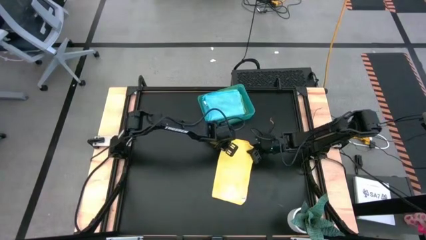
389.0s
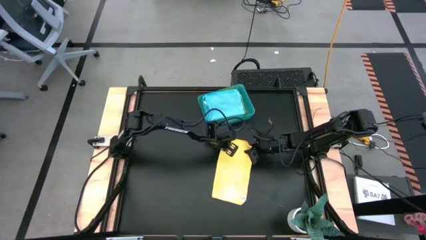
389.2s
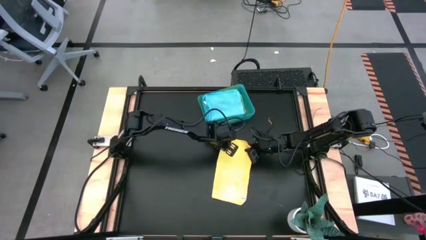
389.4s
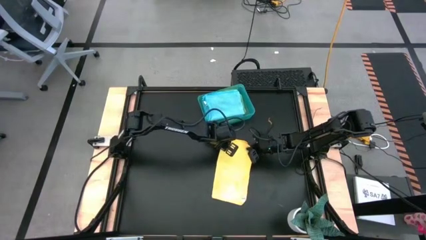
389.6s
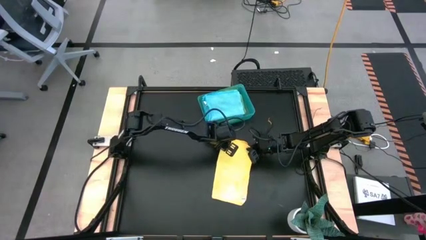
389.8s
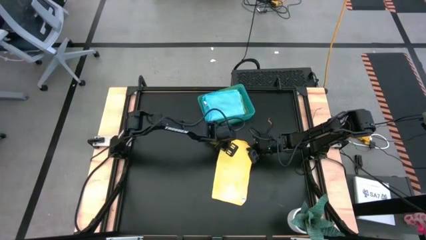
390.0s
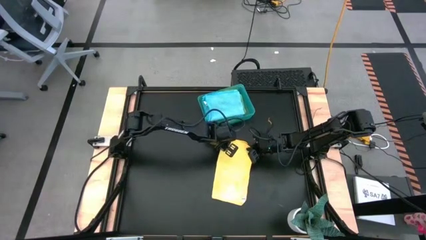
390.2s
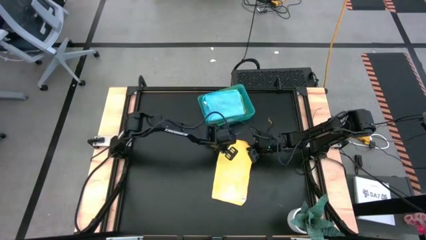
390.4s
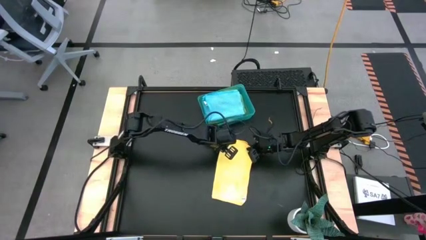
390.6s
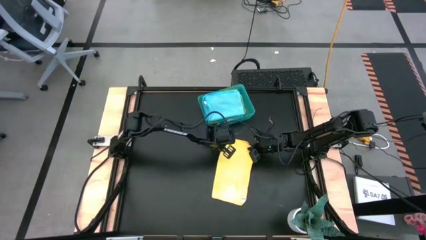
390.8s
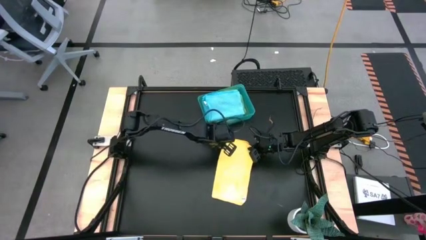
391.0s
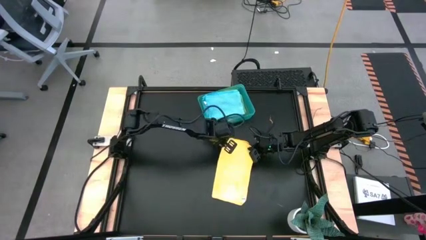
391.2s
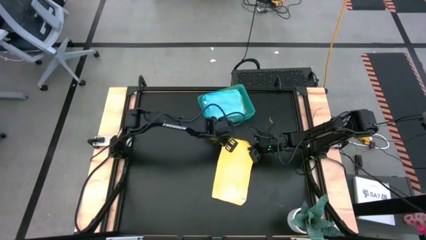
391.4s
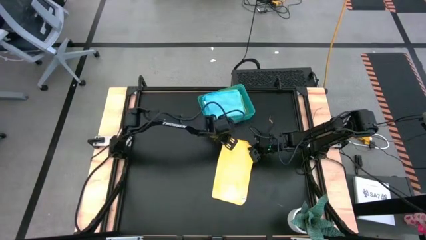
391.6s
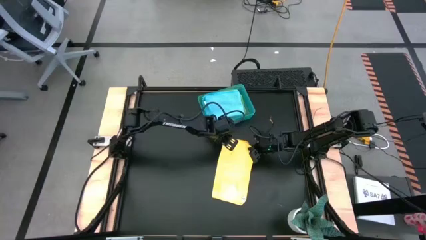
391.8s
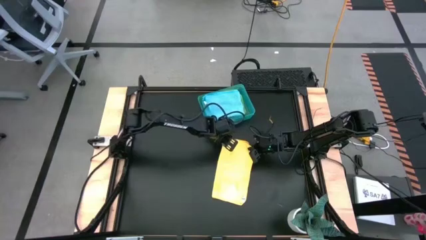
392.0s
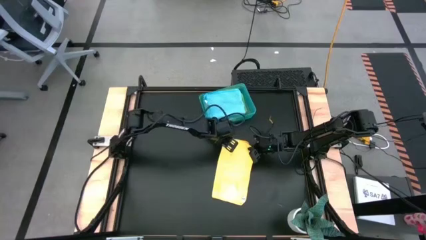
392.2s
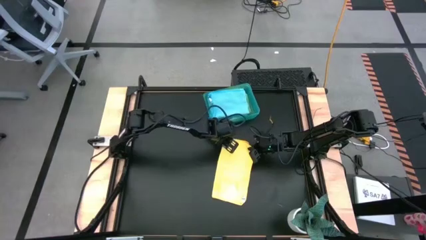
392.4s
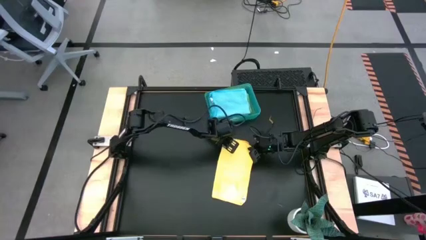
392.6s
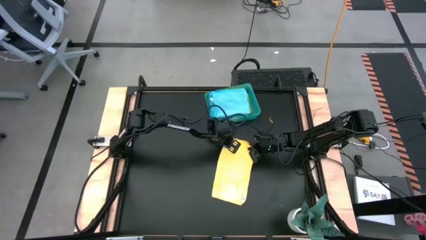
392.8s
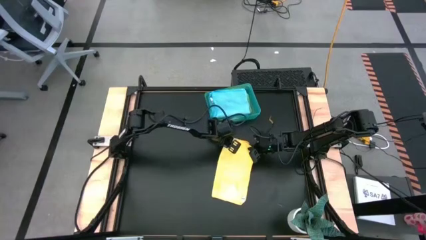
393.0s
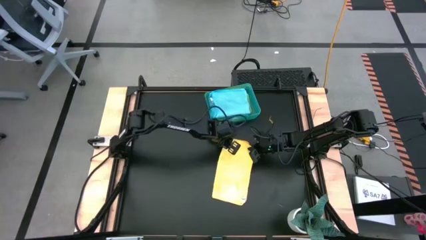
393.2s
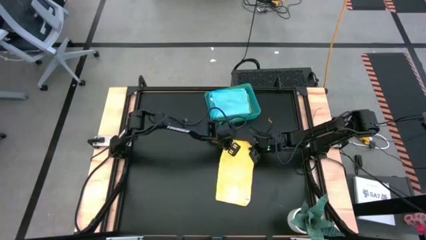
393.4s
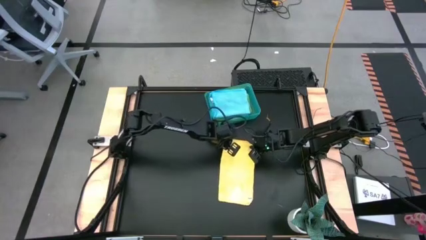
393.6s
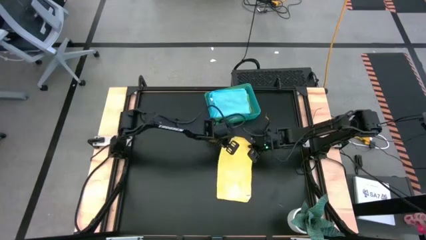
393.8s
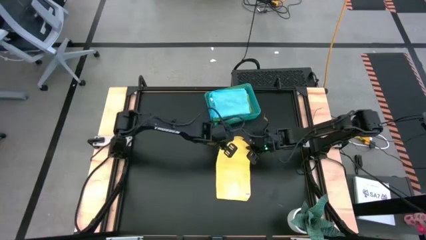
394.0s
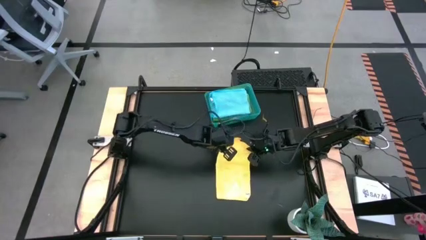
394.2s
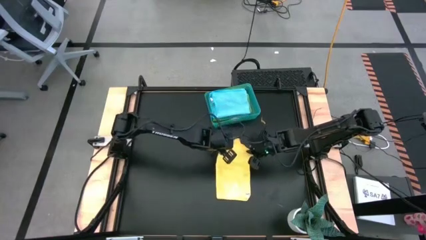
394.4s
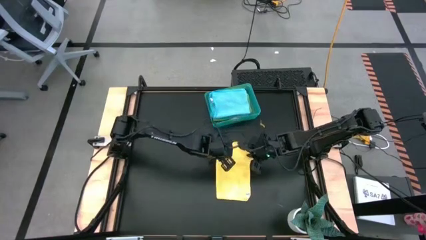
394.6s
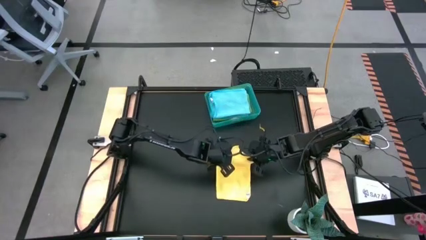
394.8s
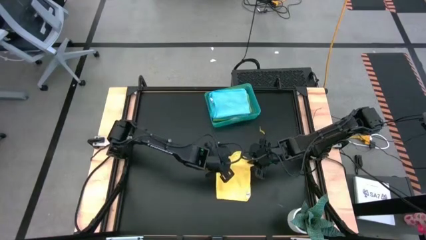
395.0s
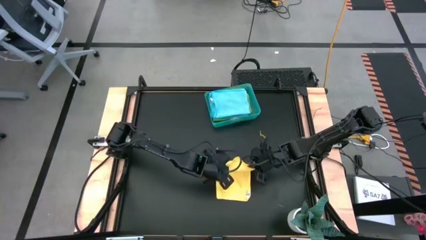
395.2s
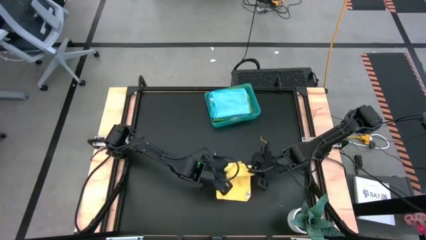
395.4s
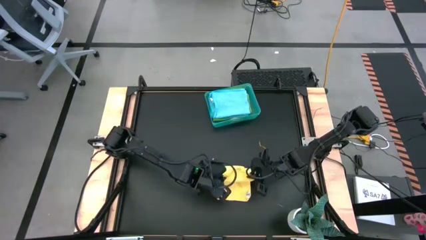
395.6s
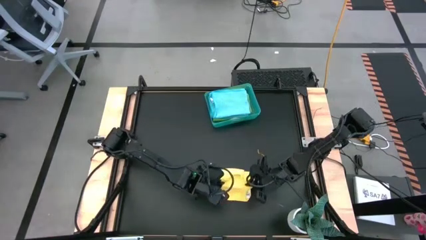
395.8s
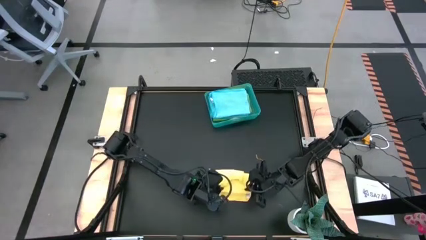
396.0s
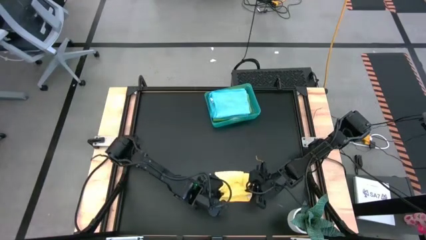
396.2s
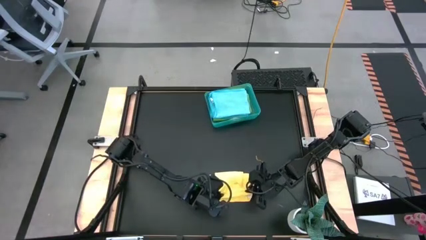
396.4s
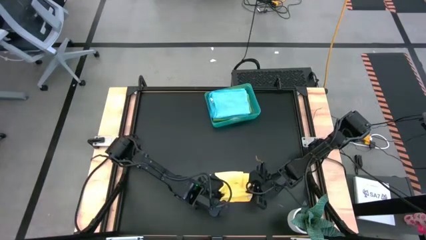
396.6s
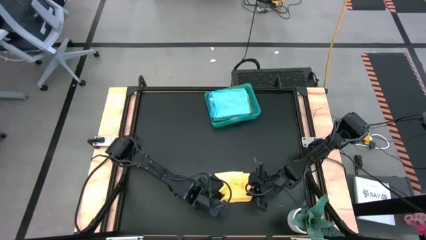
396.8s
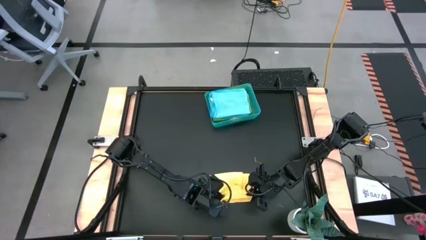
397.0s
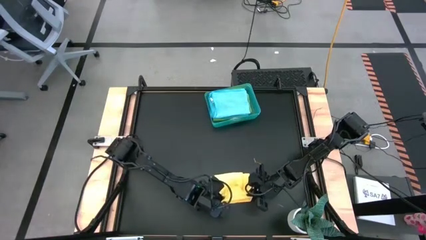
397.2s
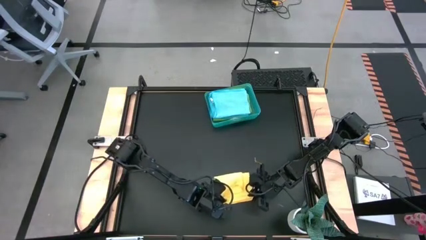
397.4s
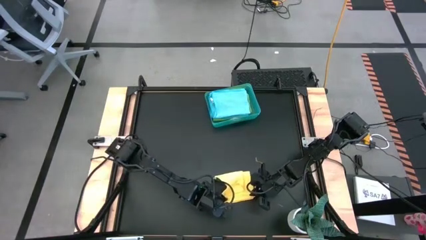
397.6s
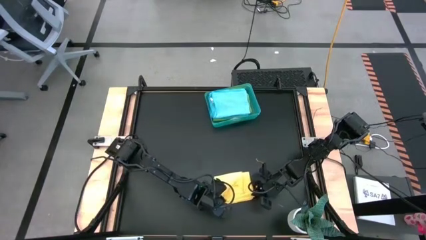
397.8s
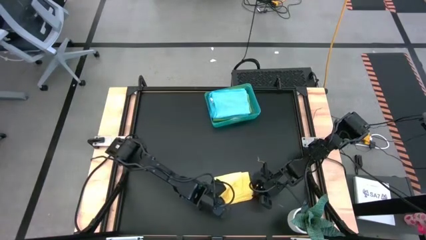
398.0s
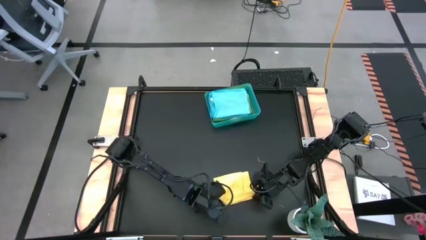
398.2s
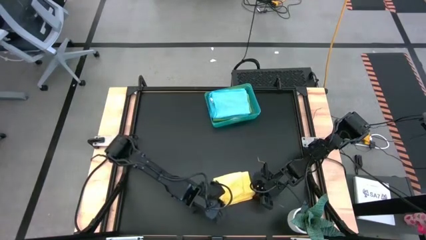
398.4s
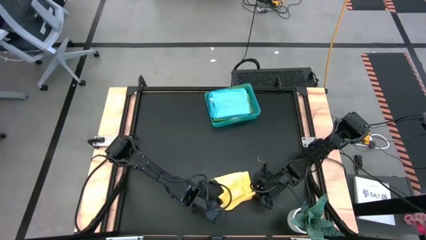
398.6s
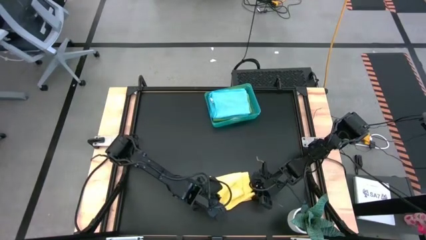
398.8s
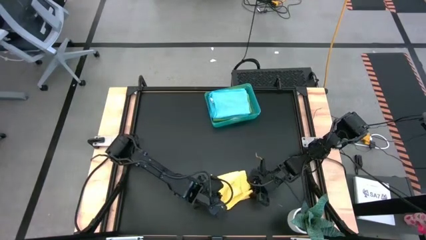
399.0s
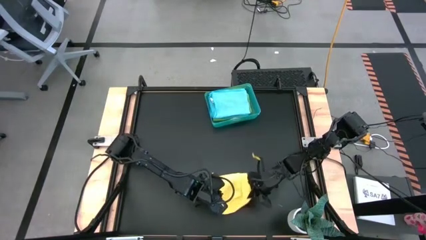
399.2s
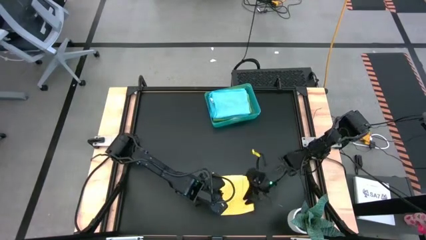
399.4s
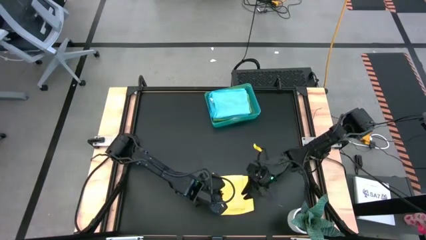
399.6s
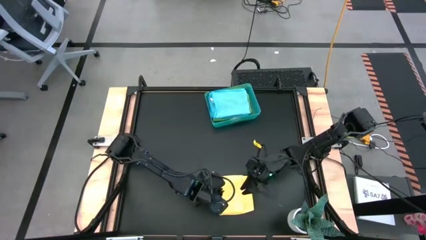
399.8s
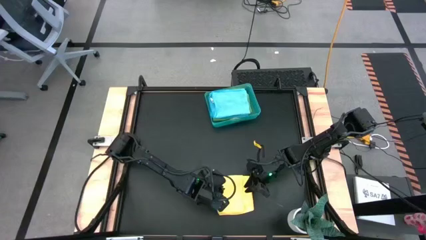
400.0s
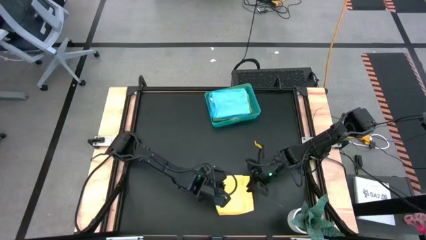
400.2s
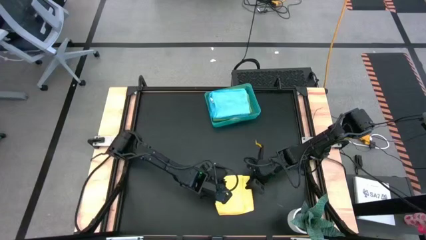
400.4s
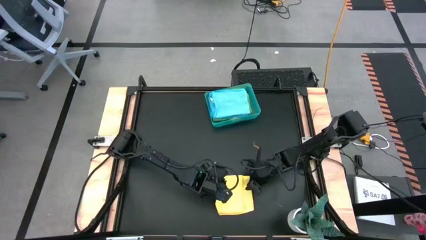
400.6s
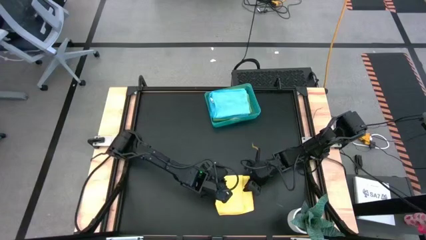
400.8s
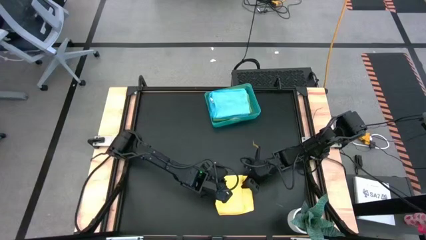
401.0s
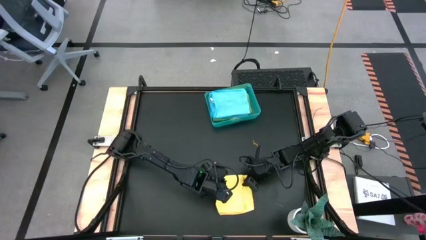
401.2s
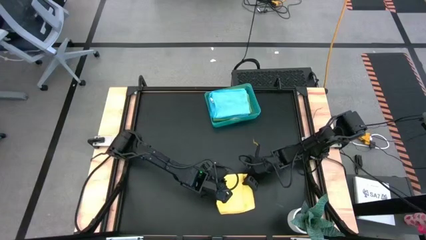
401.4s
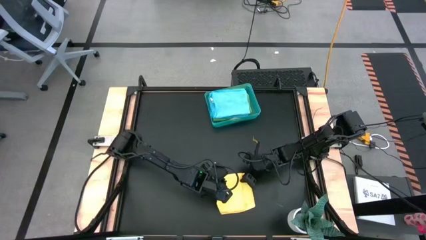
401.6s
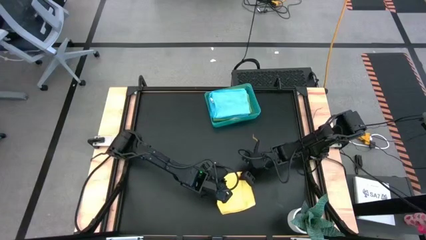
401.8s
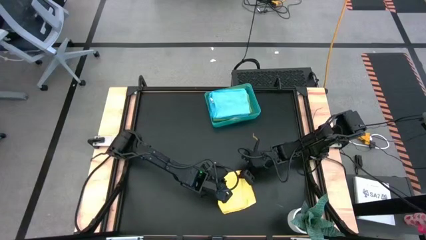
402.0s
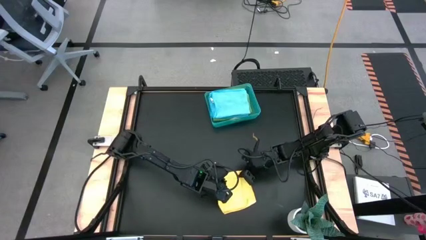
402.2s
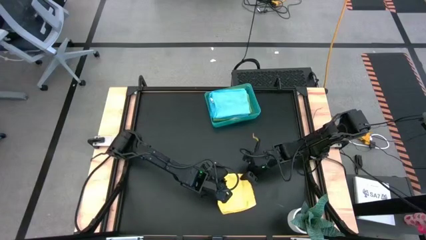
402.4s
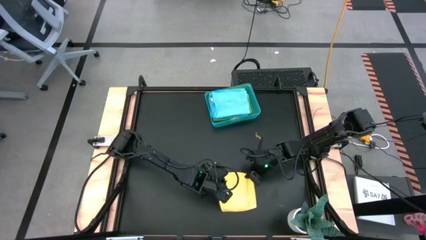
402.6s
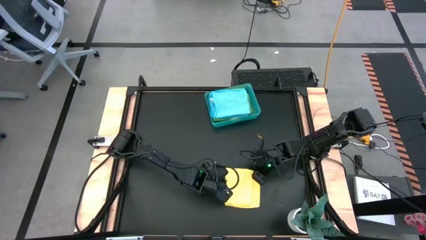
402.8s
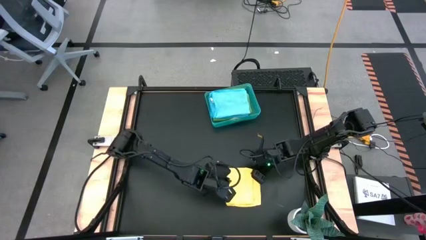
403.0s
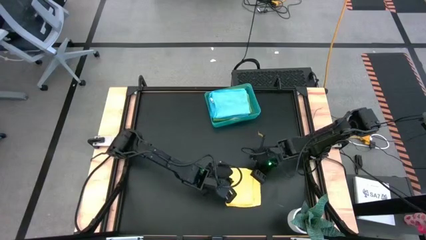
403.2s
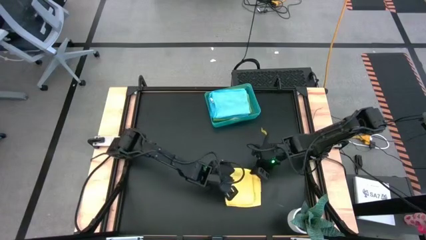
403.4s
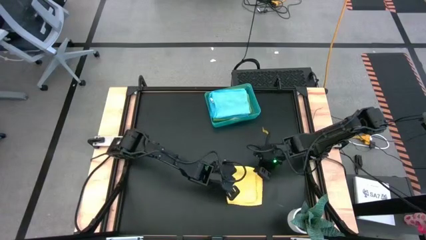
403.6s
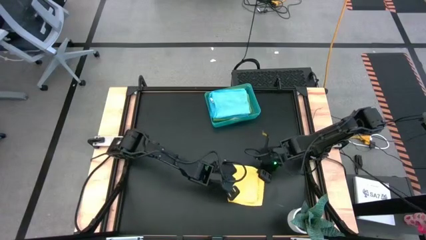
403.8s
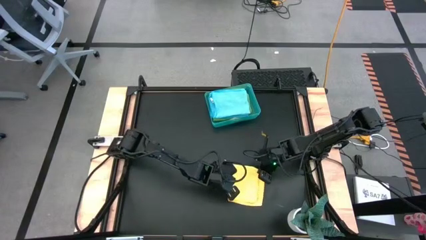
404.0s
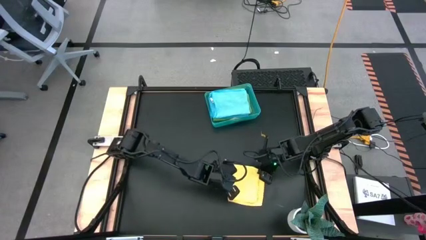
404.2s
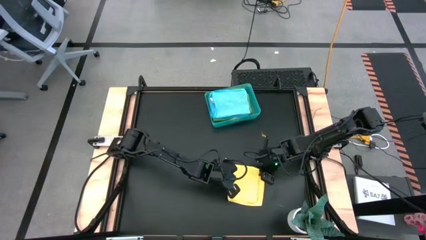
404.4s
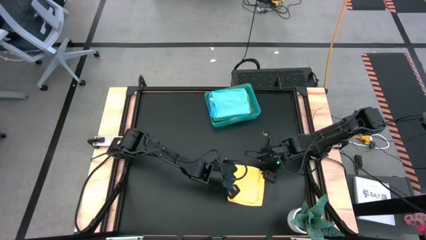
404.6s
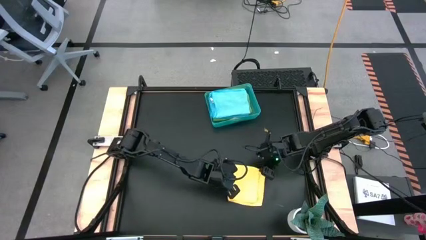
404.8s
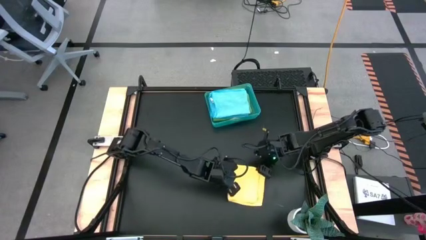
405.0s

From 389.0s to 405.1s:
Task: Fold microfiber towels
Fold the yellow microfiber towel
